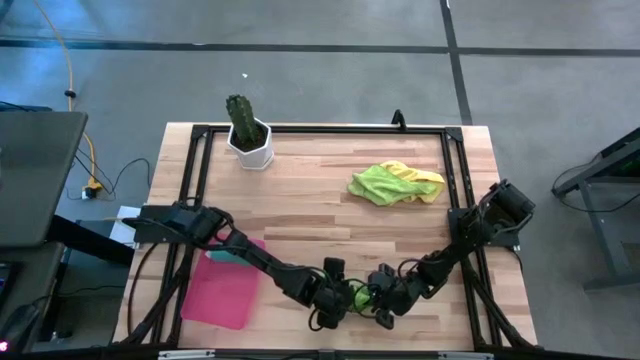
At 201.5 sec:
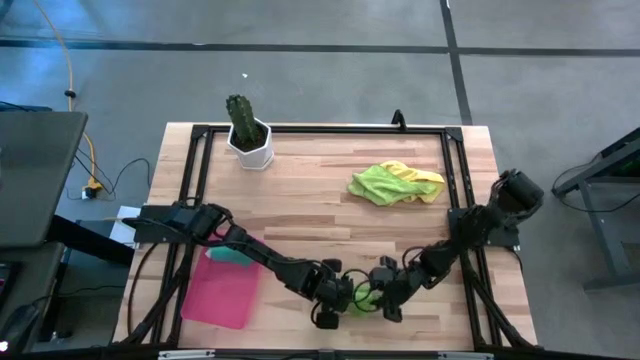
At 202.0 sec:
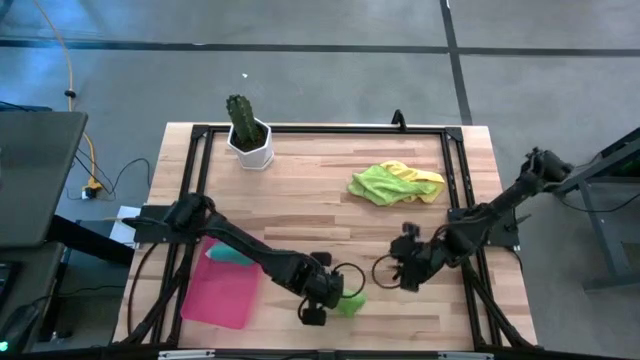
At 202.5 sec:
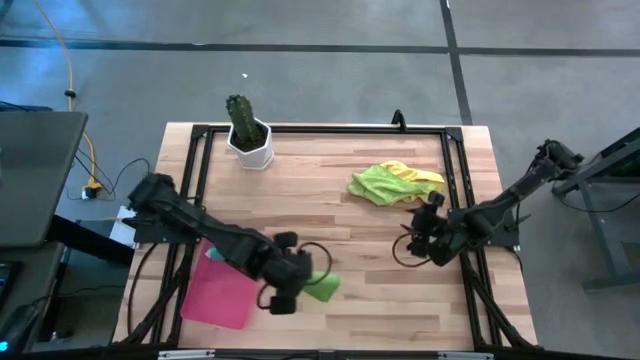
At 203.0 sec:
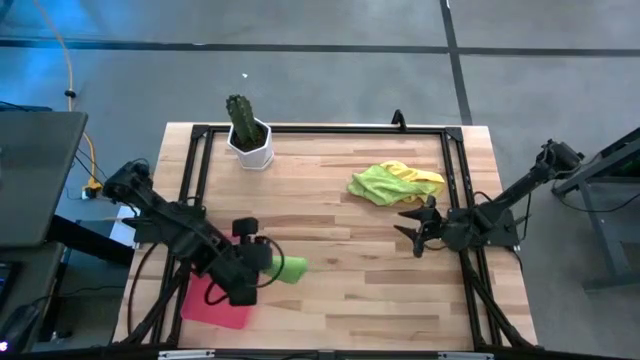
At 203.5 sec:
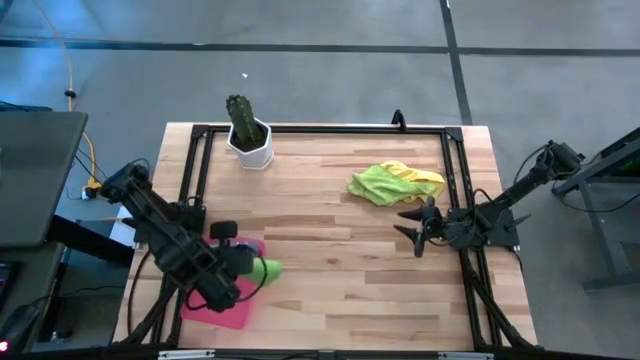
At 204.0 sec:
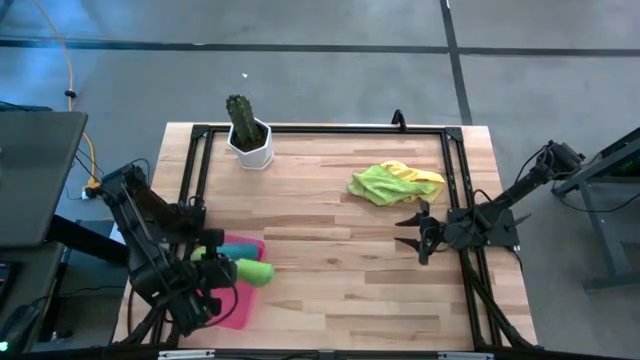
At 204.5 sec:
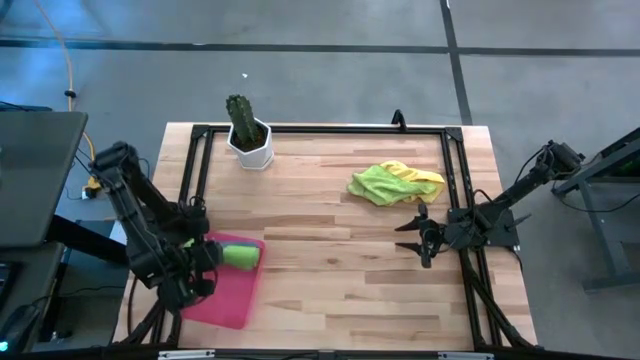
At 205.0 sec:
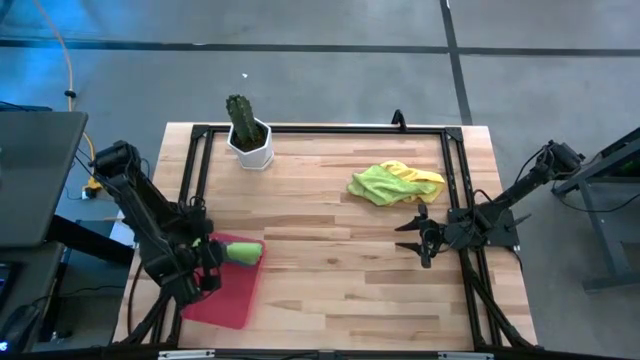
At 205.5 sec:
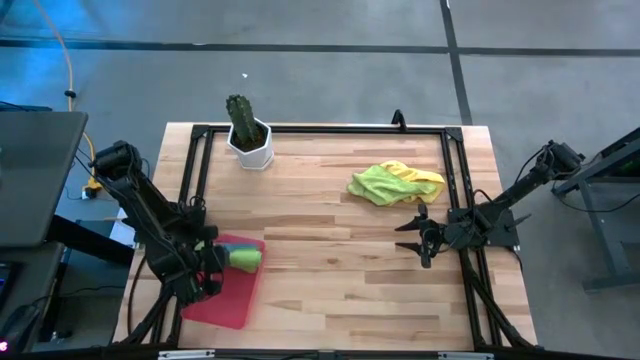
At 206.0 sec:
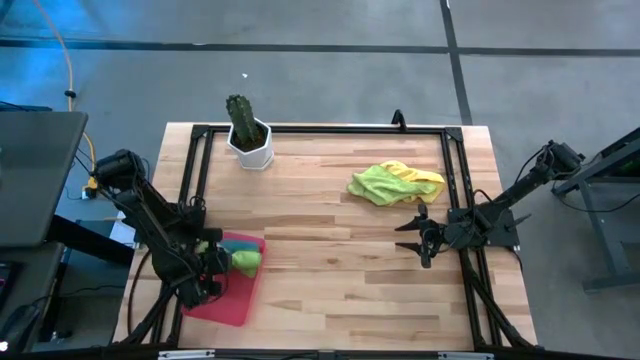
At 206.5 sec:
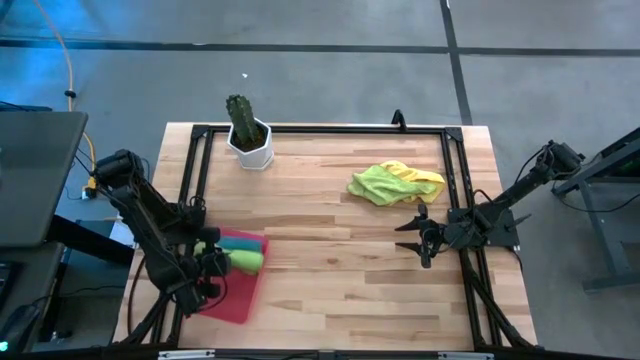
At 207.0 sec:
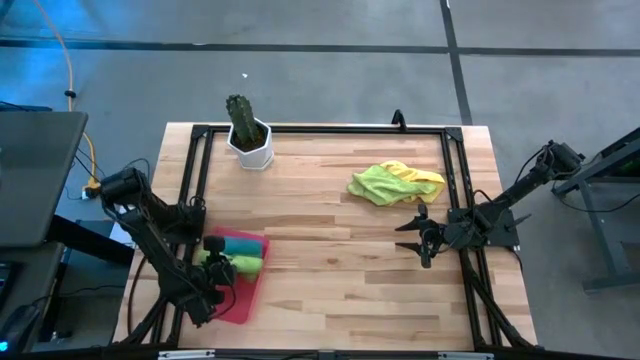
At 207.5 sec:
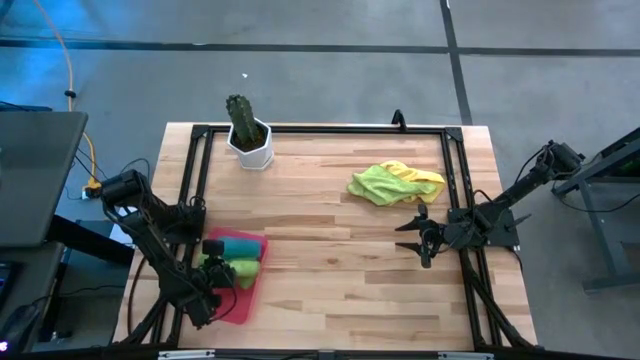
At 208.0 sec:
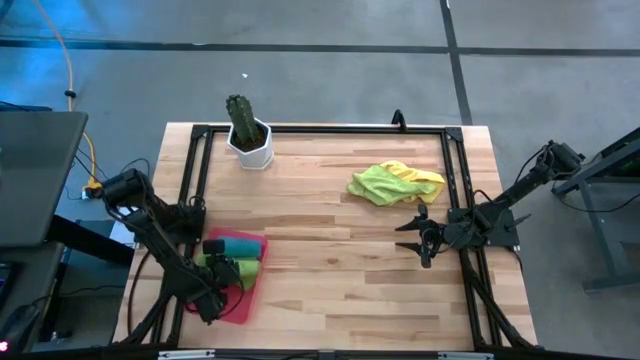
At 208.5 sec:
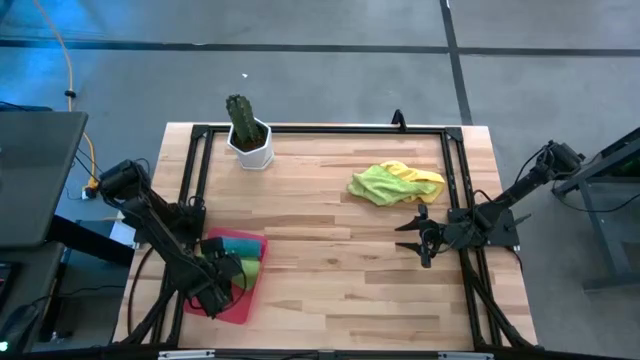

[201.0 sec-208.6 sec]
Task: Roll microfiber towels into tight, uniform cylinder then place into a basket
Put the rolled green towel into the red bin

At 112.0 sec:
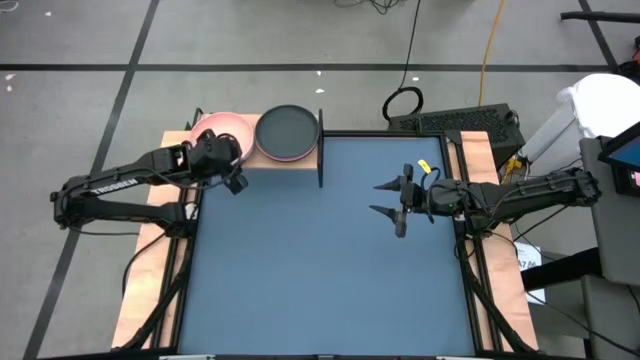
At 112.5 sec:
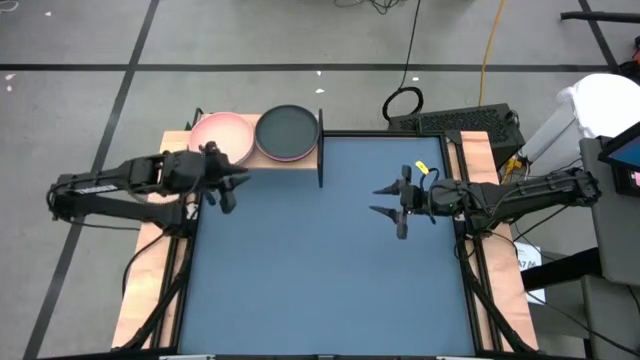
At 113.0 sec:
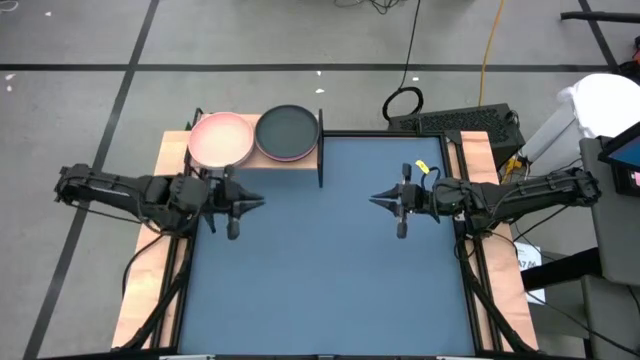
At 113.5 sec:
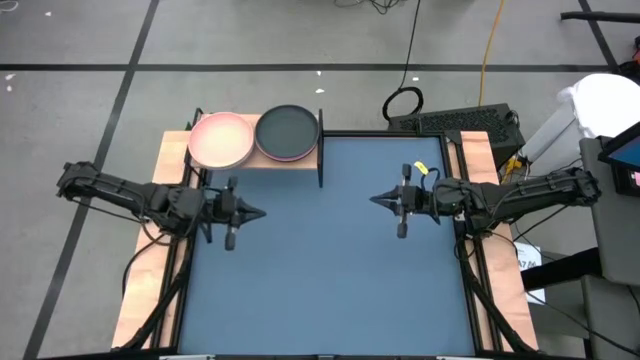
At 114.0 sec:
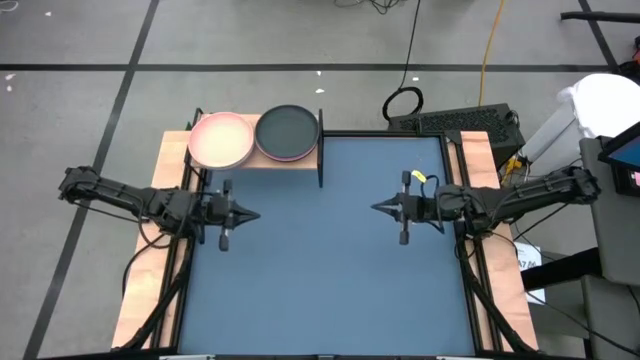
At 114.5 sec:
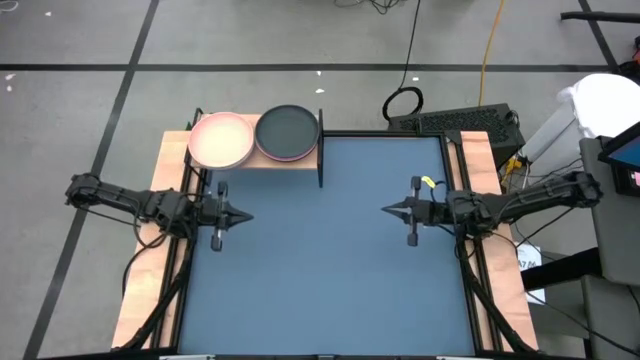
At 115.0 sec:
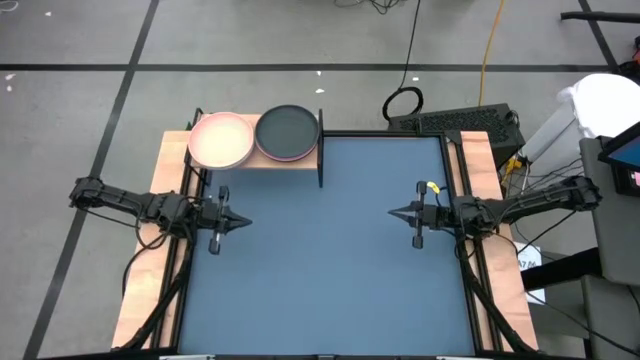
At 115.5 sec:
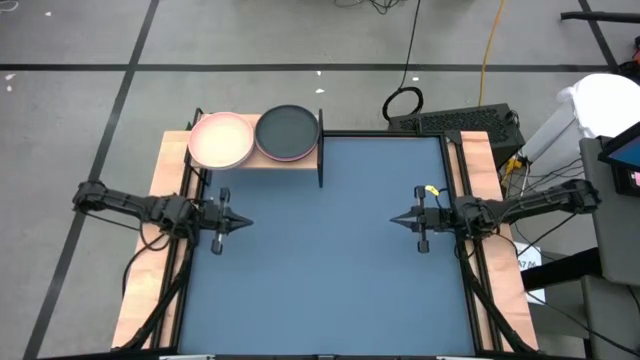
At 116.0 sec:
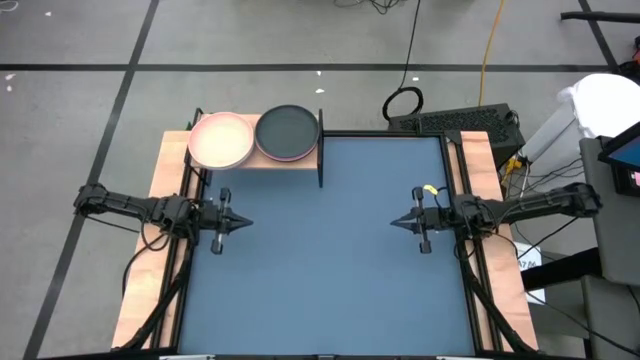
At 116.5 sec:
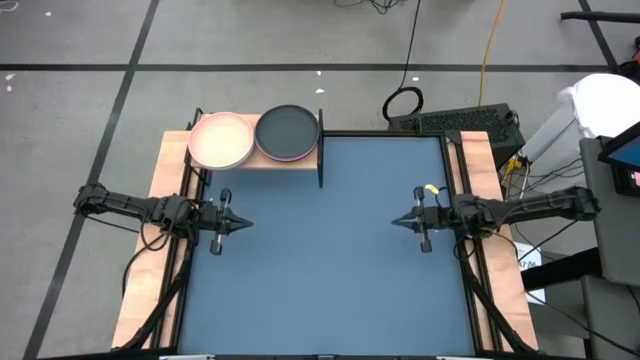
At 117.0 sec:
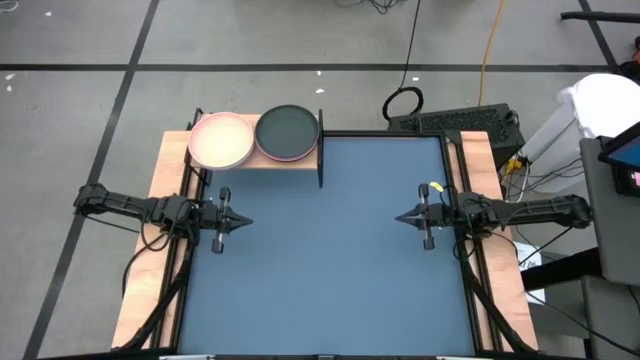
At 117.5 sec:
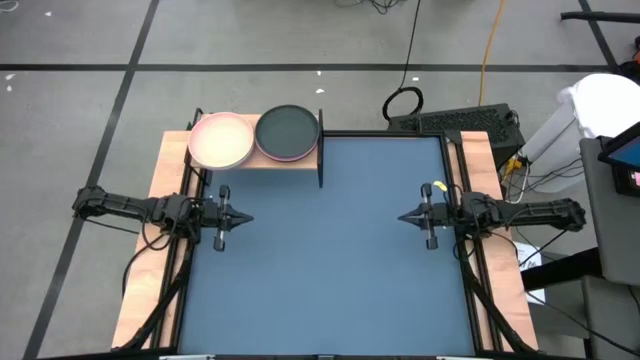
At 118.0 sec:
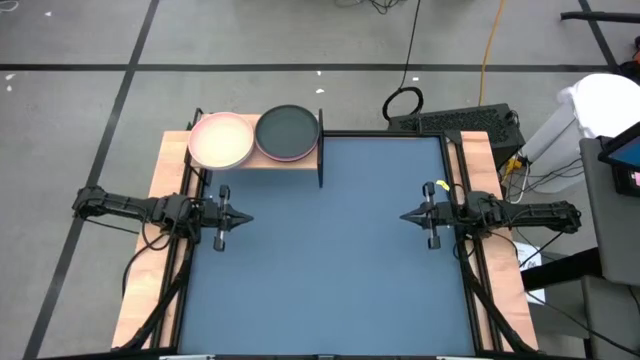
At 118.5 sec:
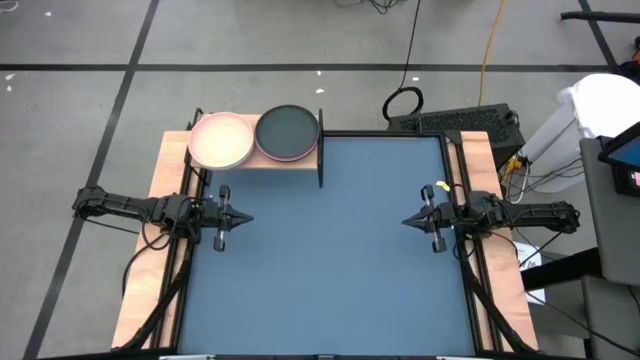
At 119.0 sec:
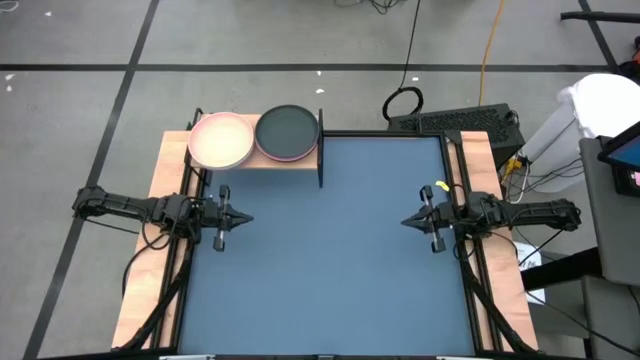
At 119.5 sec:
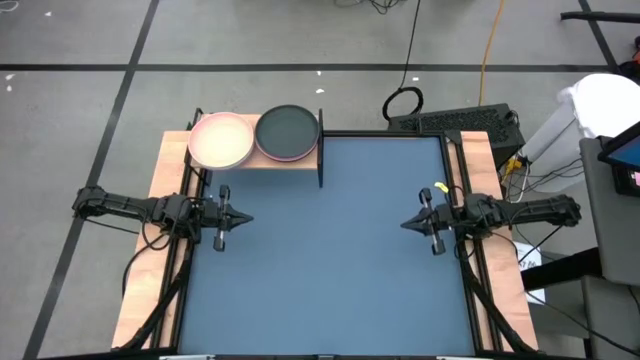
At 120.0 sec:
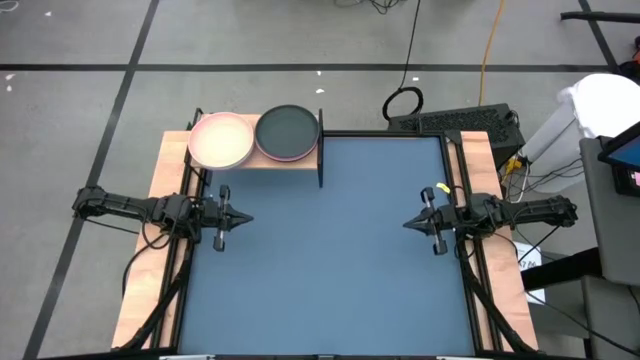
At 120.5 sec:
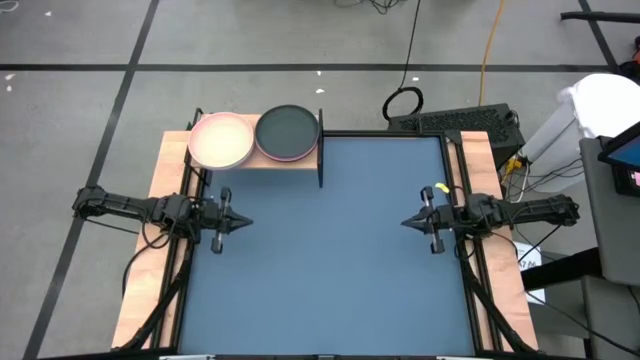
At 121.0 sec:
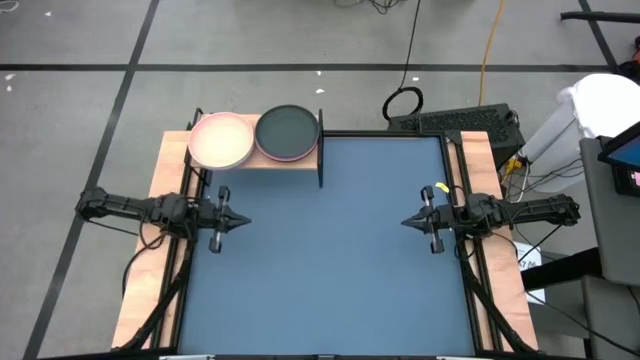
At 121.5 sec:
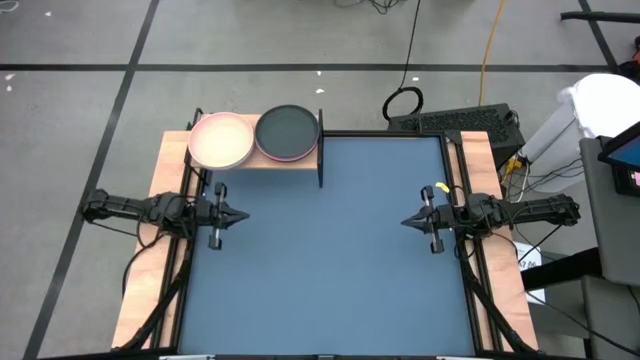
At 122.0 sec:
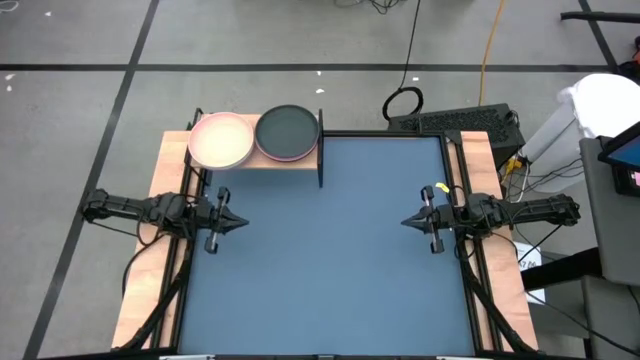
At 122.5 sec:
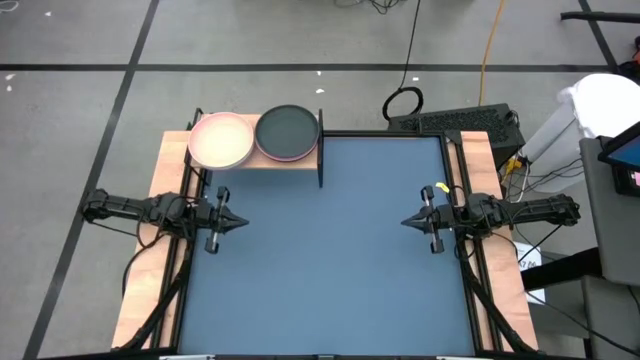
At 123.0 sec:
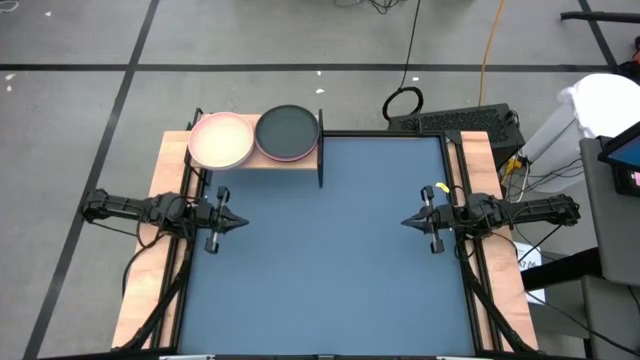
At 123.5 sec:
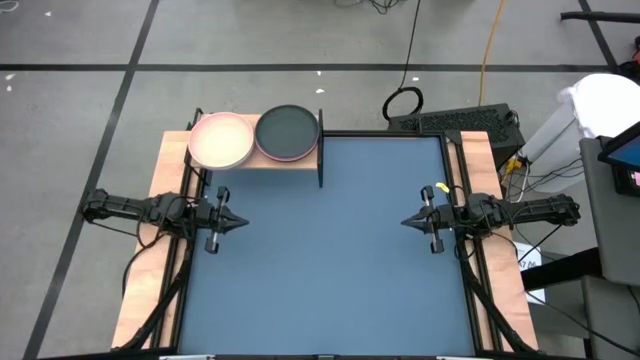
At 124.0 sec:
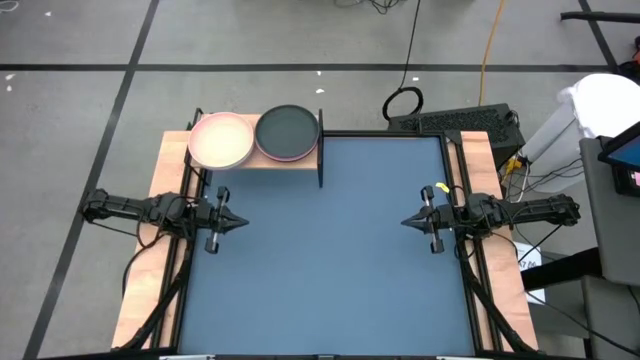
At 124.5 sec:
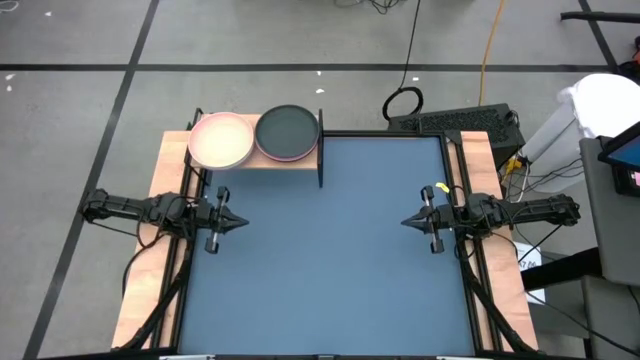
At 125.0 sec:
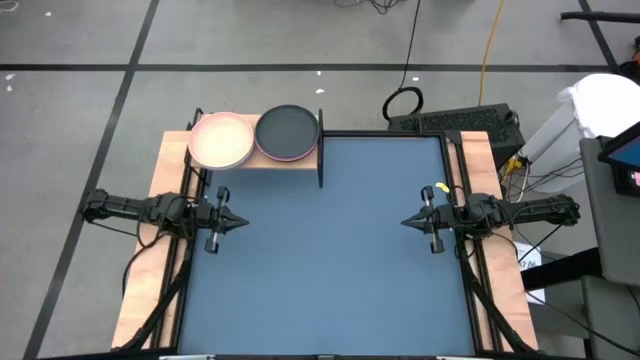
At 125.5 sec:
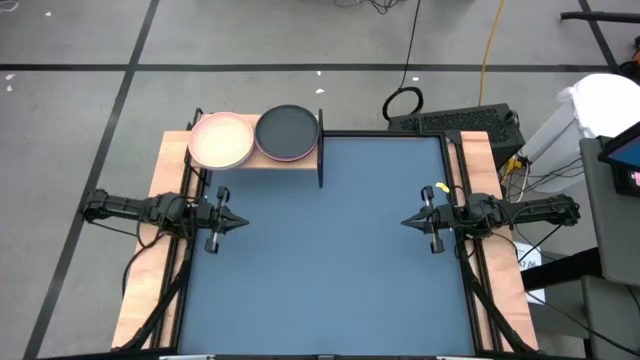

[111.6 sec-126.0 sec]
Task: Place and stack plates onto a shelf
Return to Home Position
